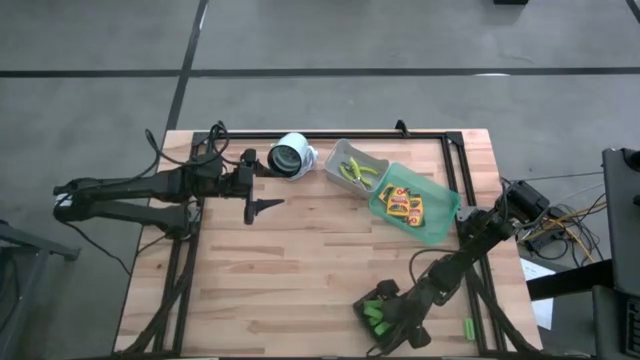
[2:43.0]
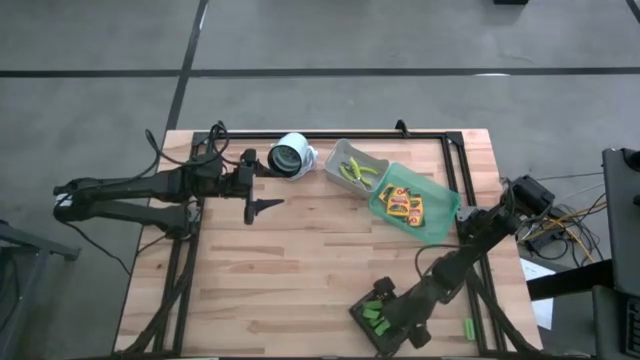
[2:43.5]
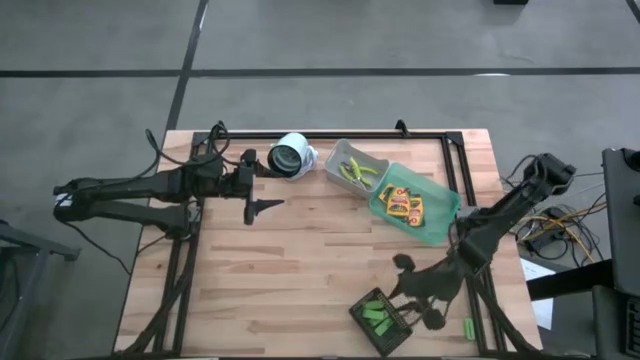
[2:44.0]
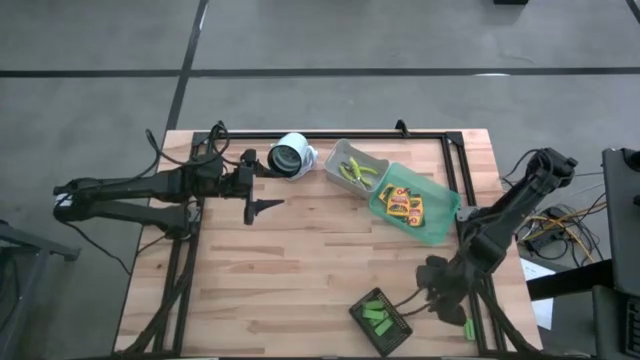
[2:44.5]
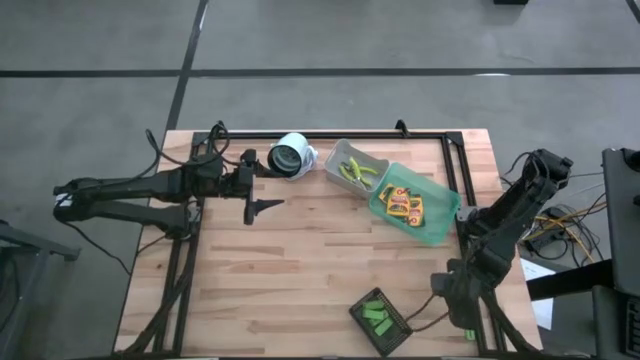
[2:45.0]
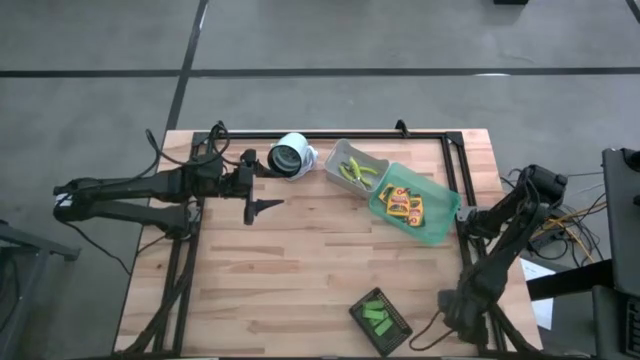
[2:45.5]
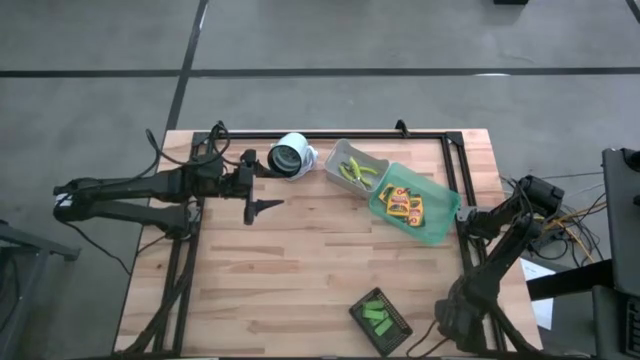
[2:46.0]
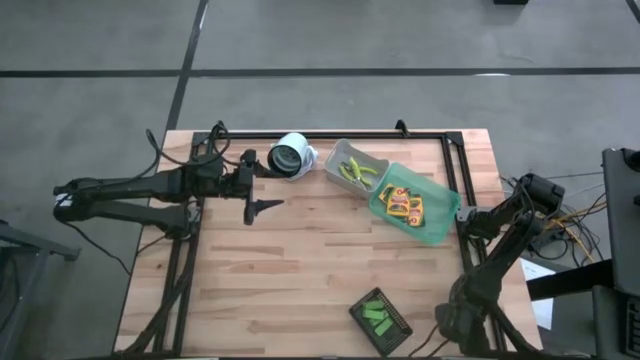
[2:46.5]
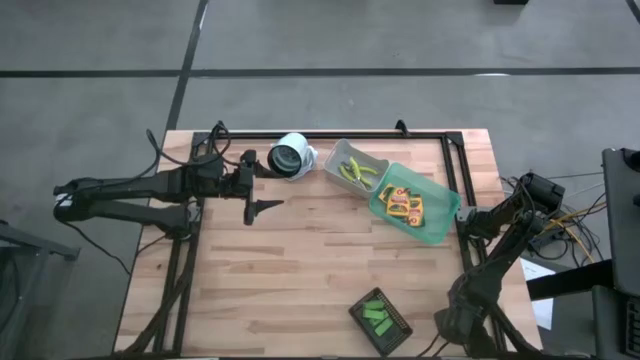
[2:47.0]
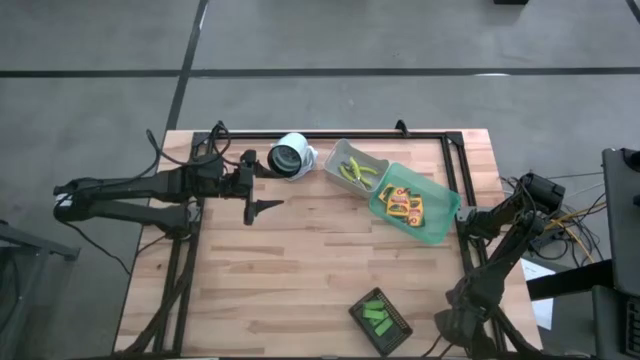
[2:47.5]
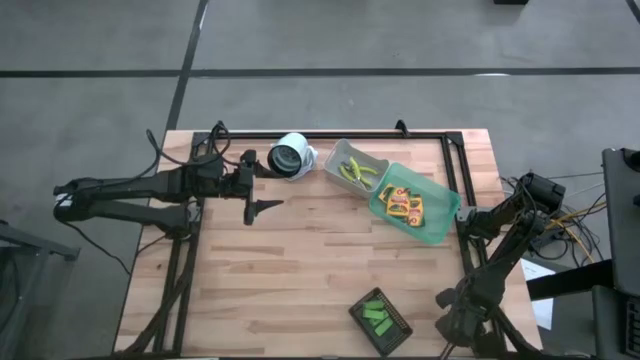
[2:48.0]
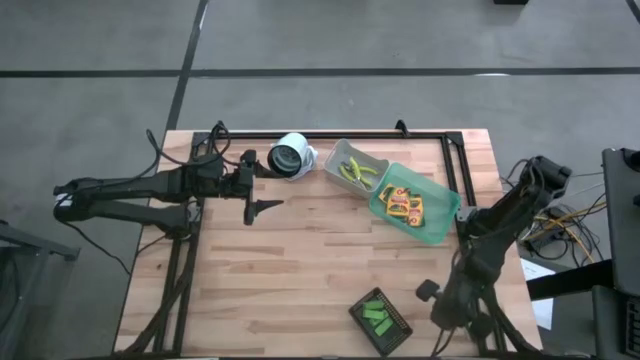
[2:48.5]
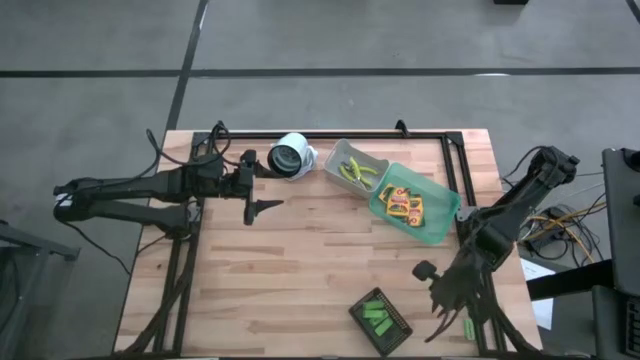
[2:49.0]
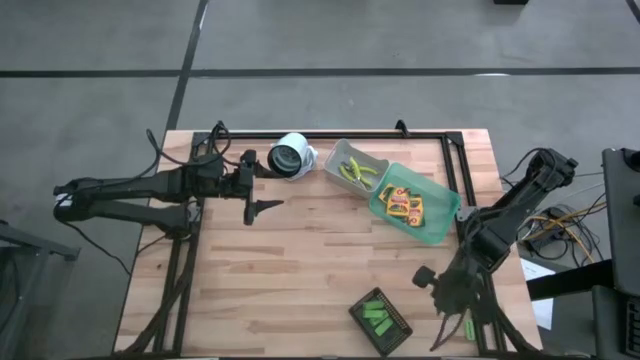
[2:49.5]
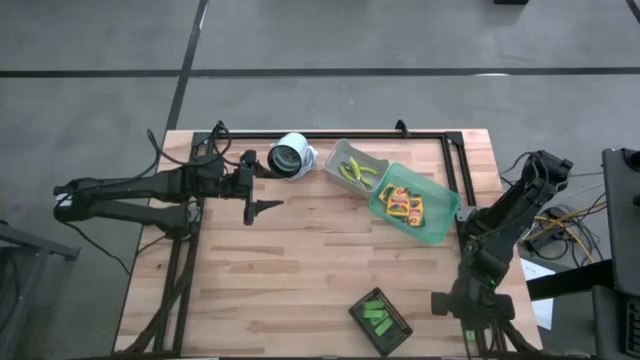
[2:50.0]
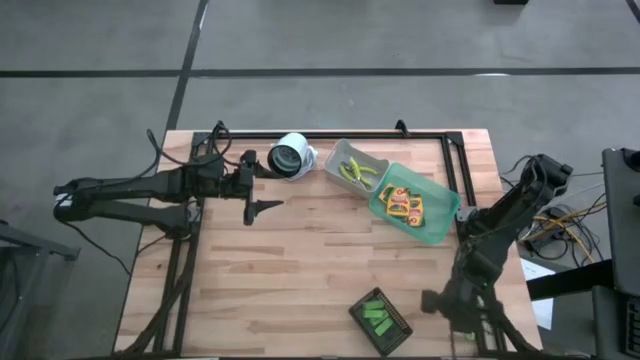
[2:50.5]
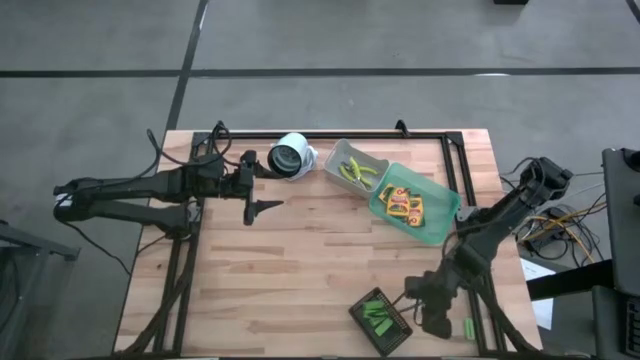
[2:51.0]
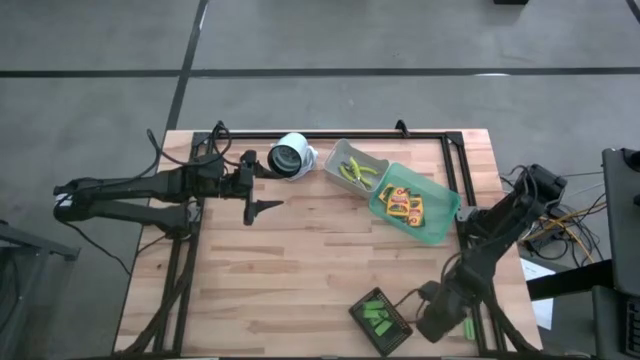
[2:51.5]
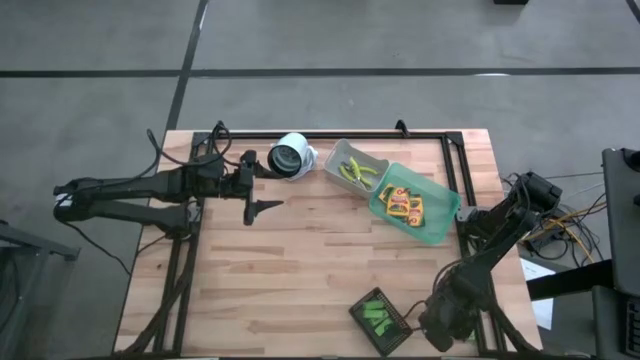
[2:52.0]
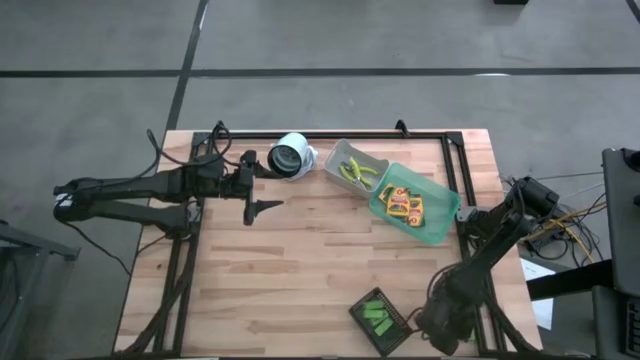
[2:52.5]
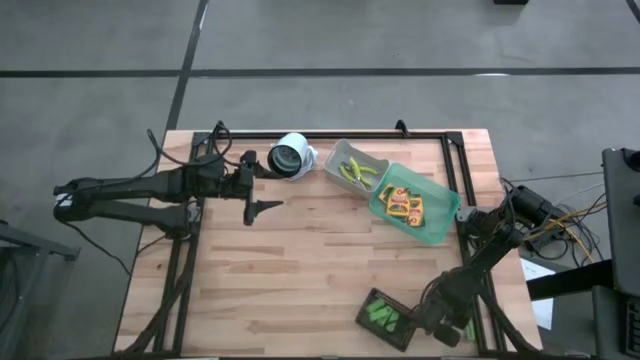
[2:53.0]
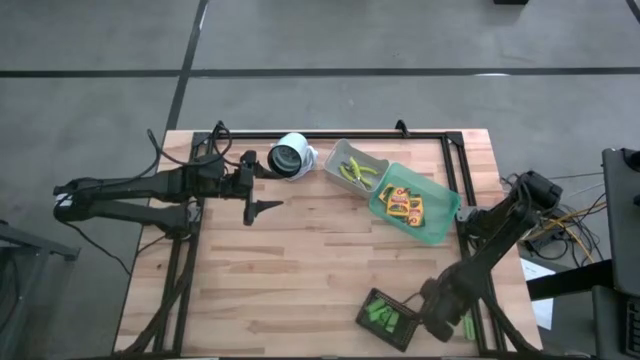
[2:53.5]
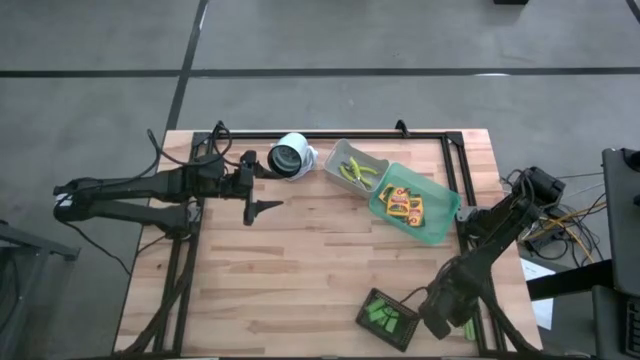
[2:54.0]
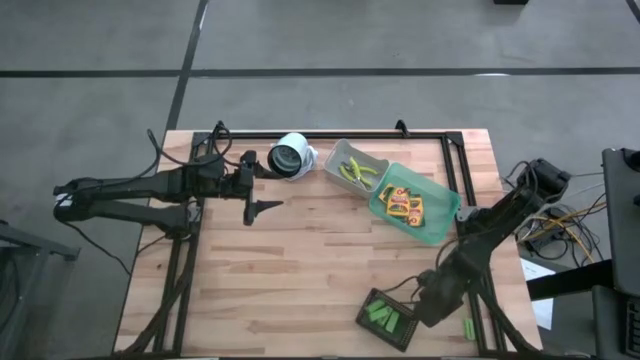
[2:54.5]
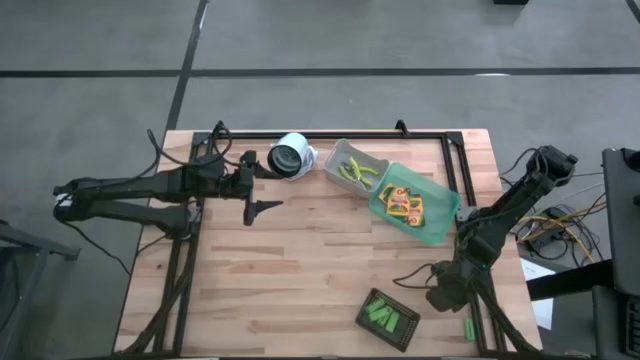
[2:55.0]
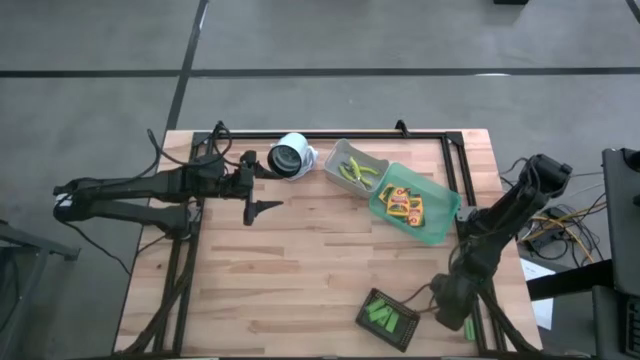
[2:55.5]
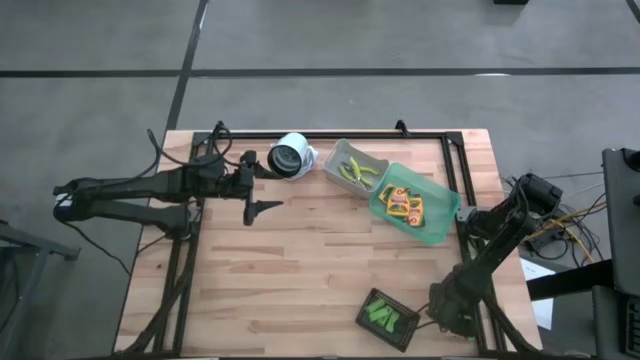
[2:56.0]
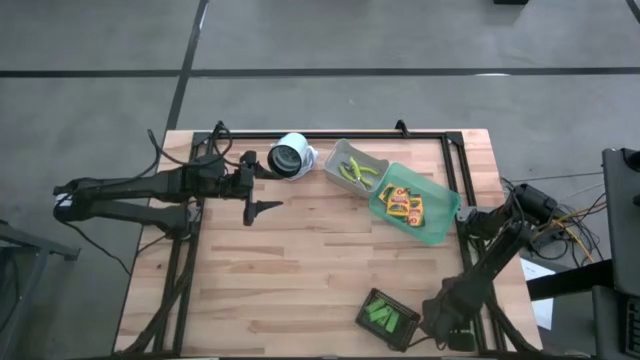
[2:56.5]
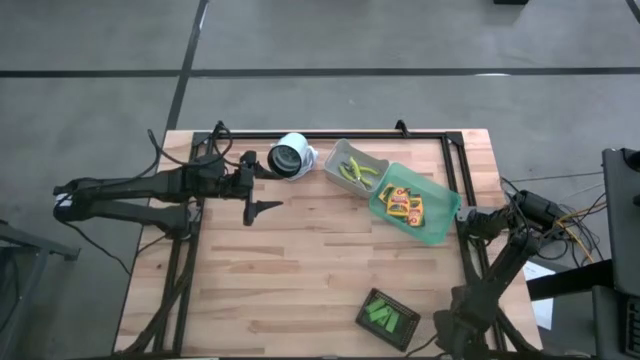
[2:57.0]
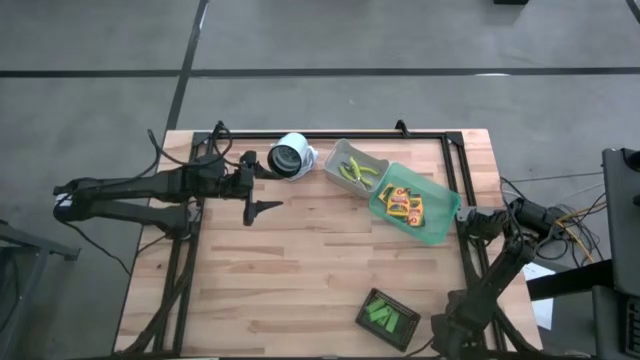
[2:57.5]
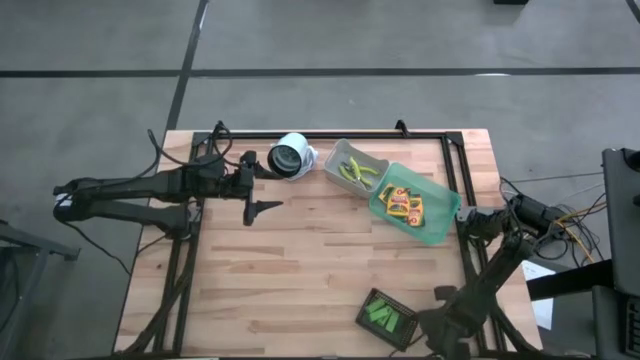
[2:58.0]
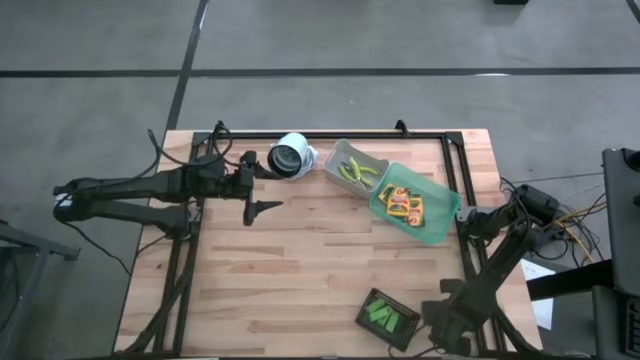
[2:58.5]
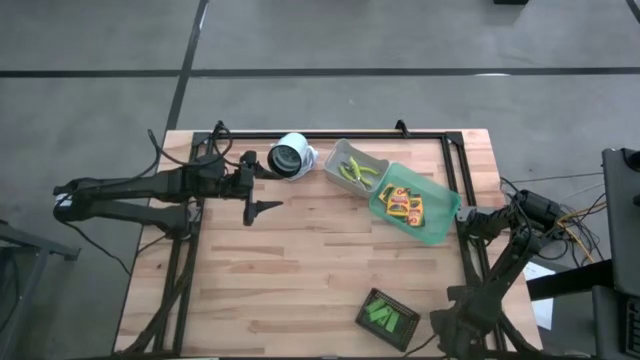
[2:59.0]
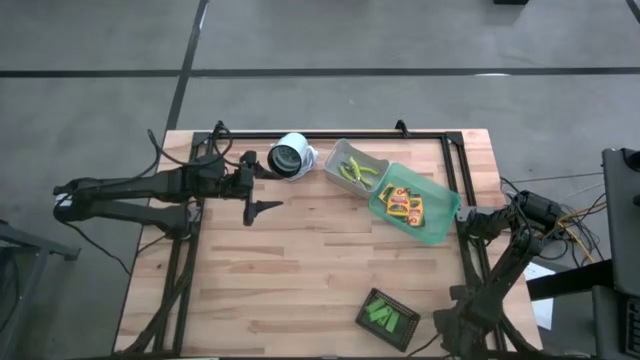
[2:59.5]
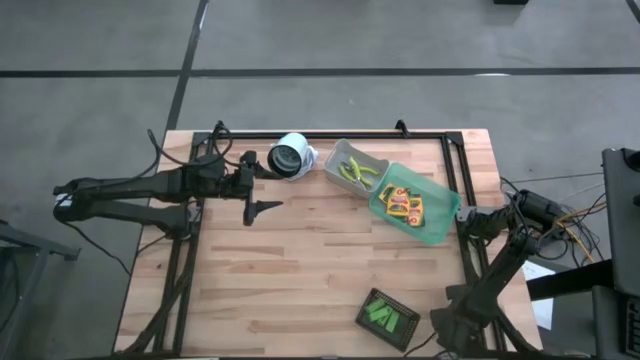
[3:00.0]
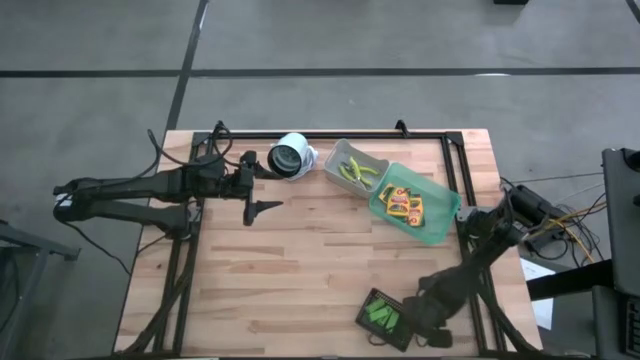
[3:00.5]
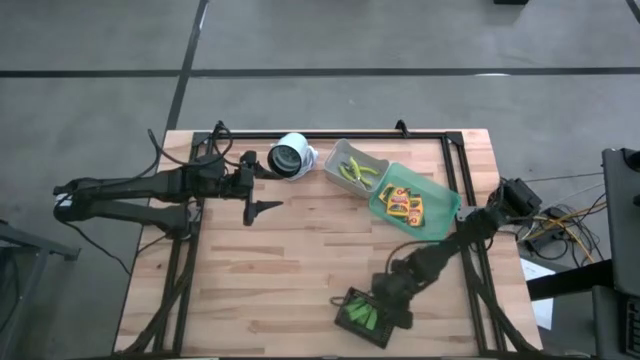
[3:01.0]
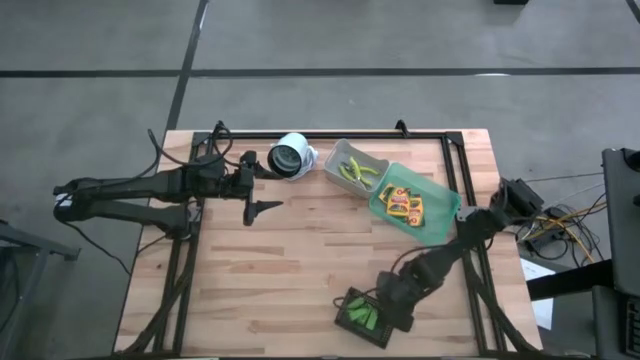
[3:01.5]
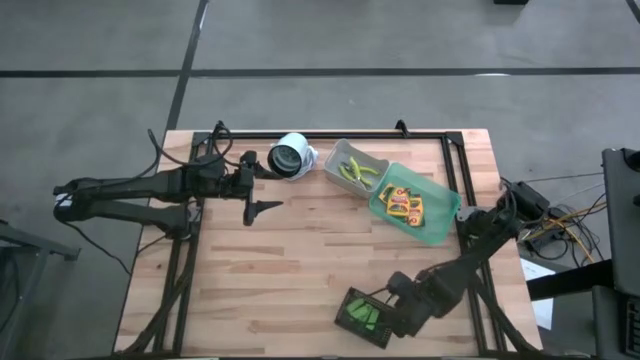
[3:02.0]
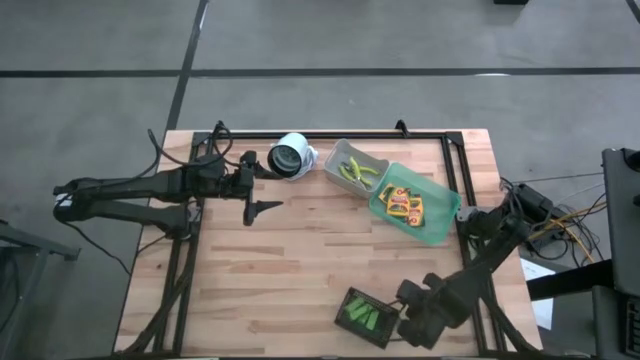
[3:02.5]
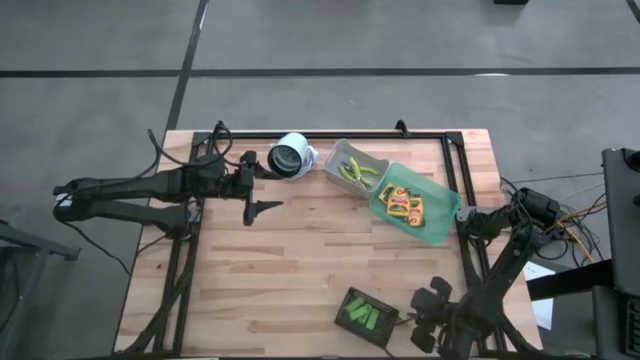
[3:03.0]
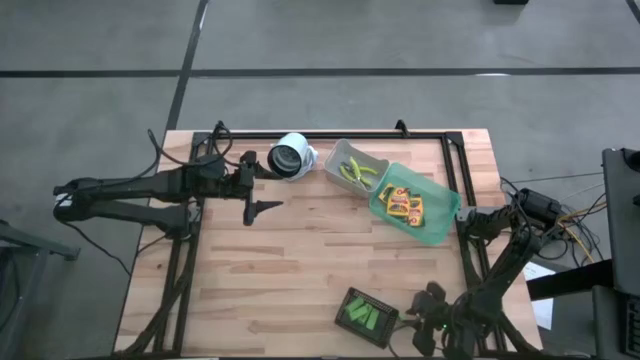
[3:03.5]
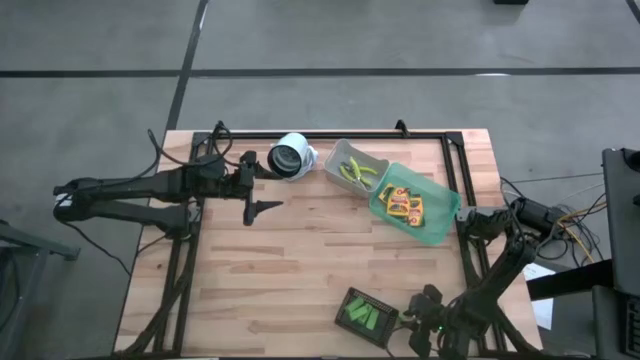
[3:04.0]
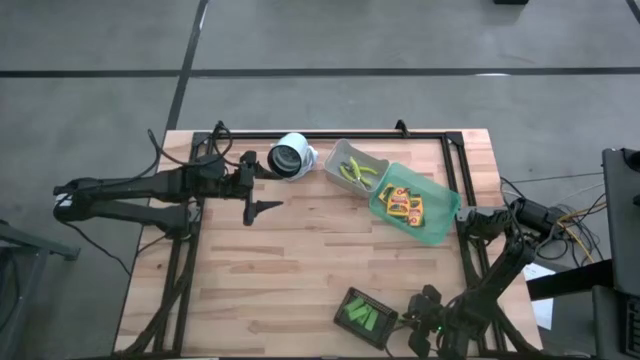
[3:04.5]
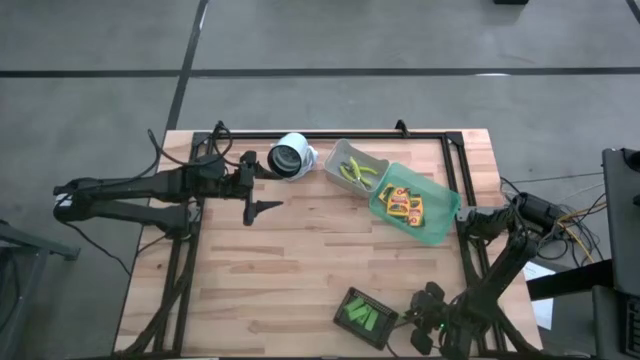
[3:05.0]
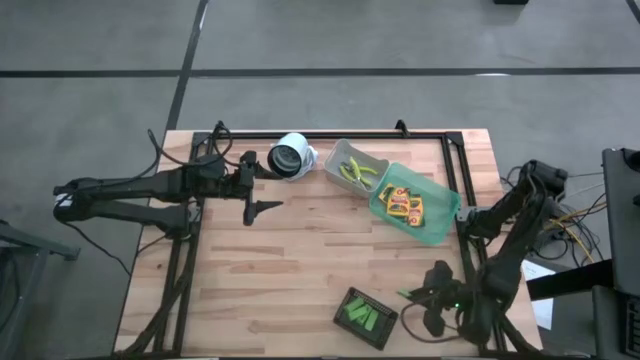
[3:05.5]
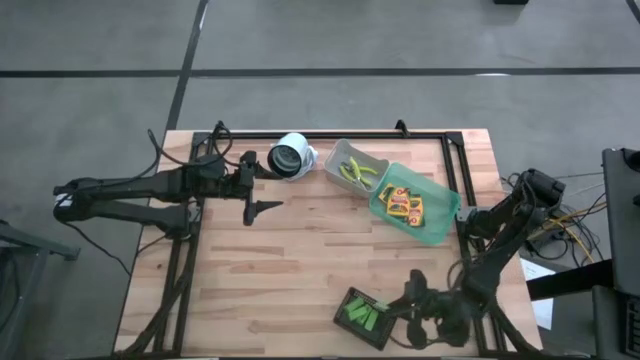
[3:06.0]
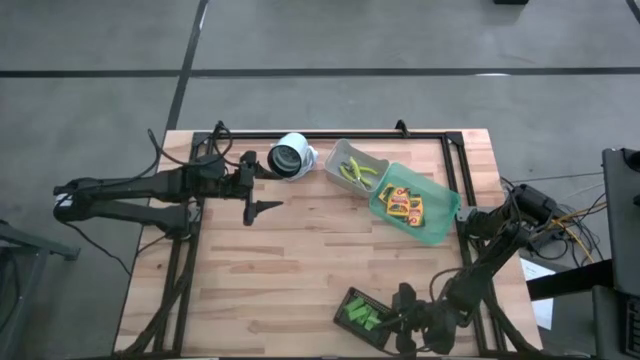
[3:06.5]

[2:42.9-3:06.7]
Task: Pick & Place School Supplies
Put the green eraser into the black bin
